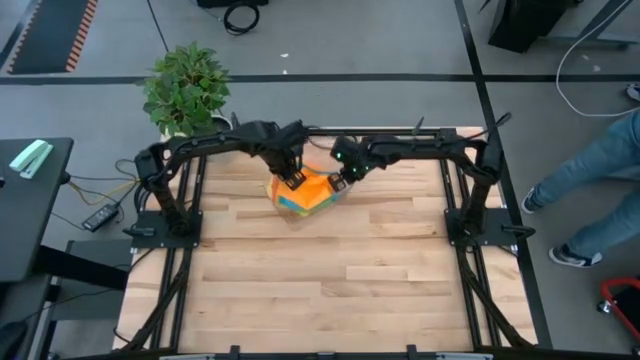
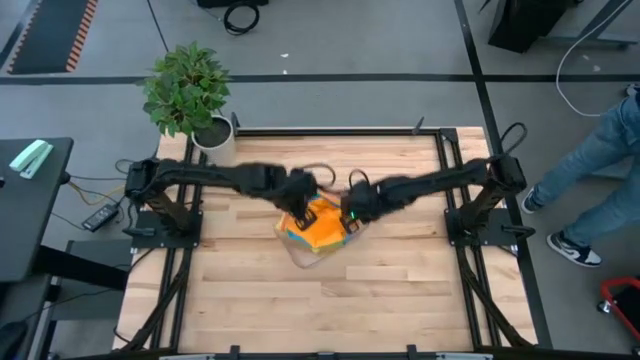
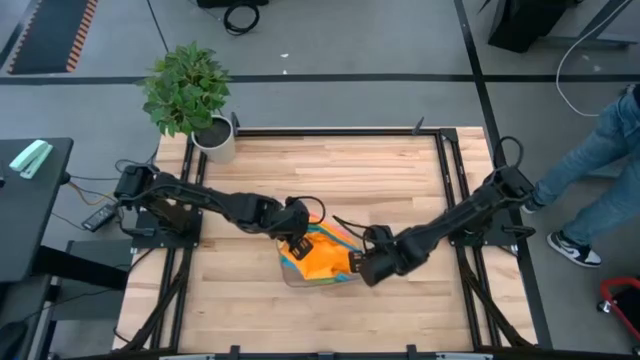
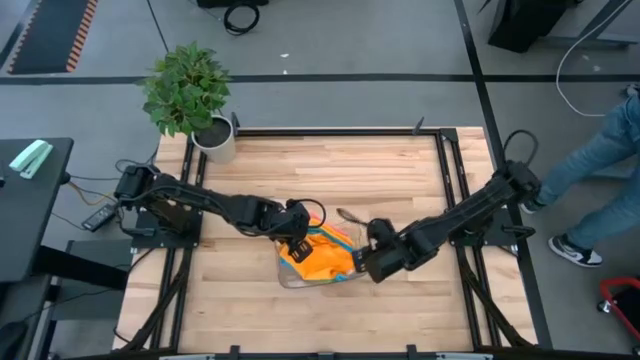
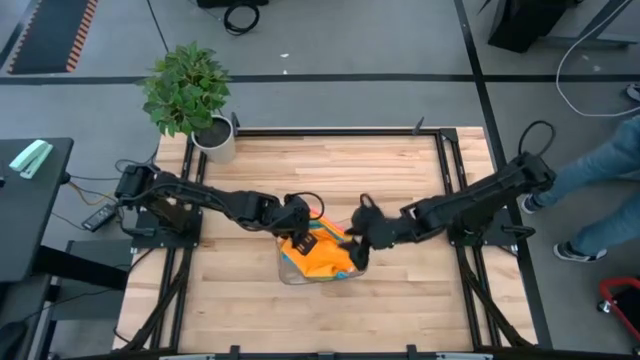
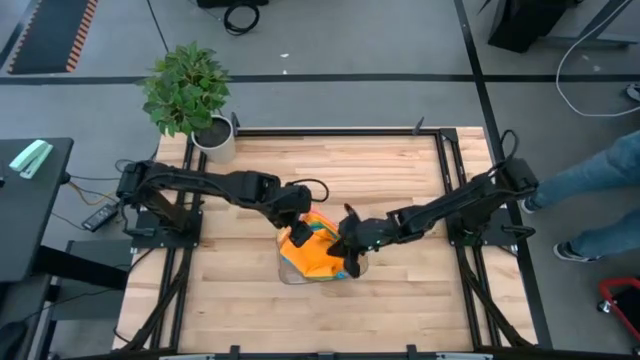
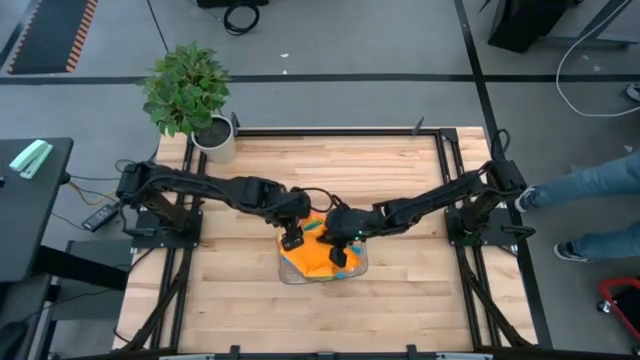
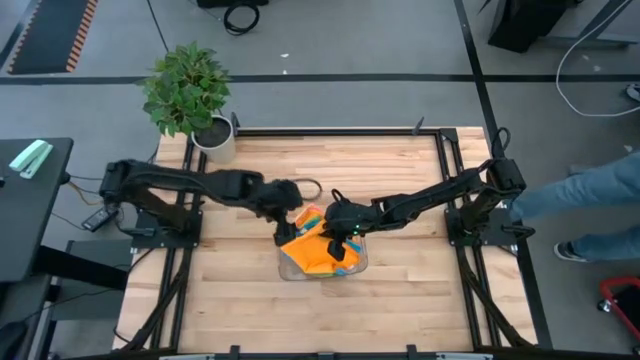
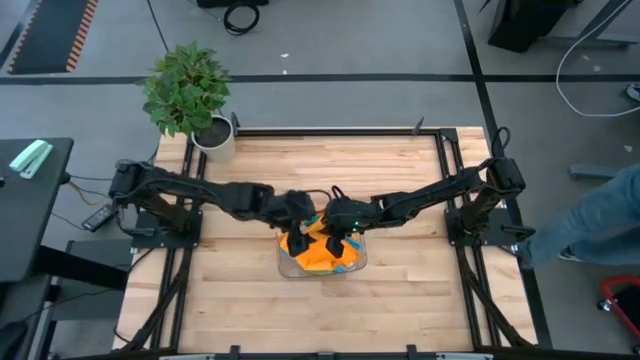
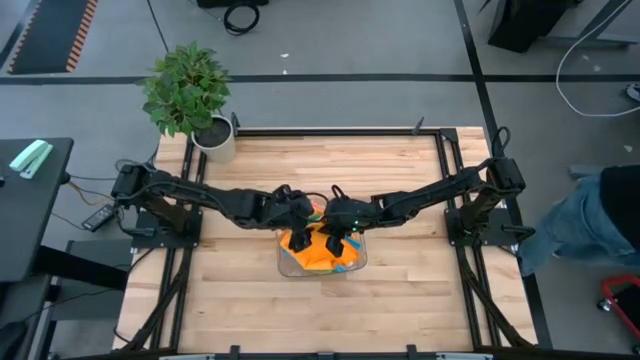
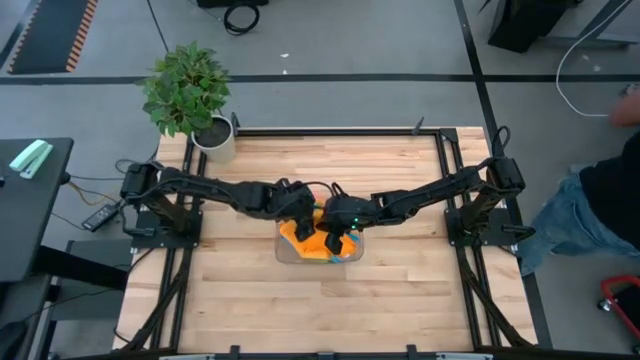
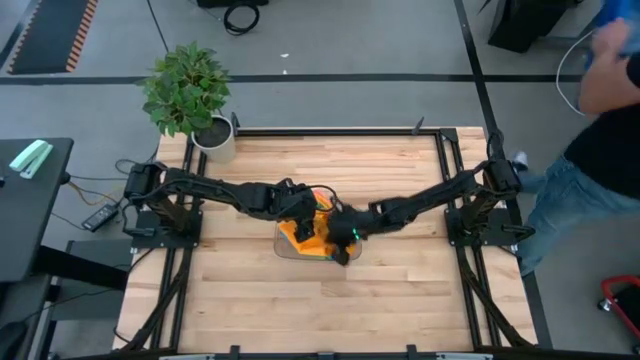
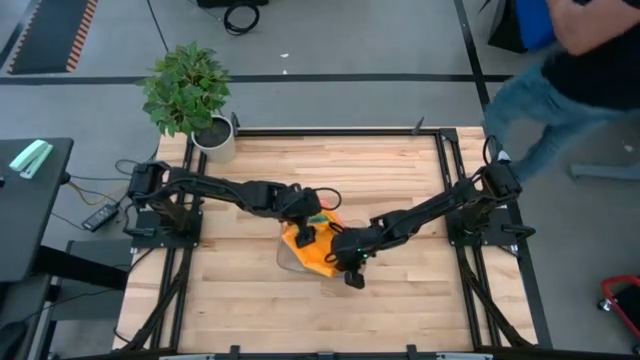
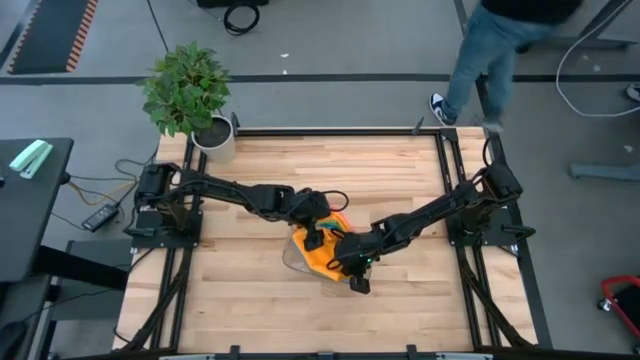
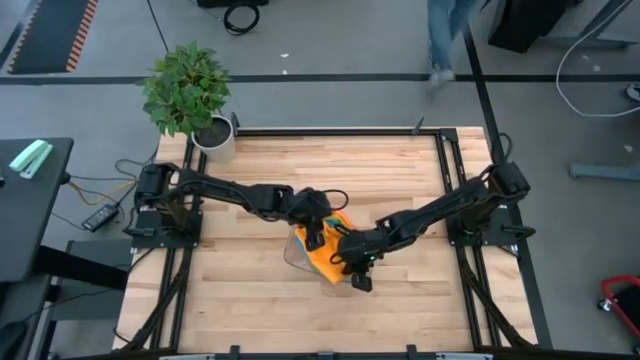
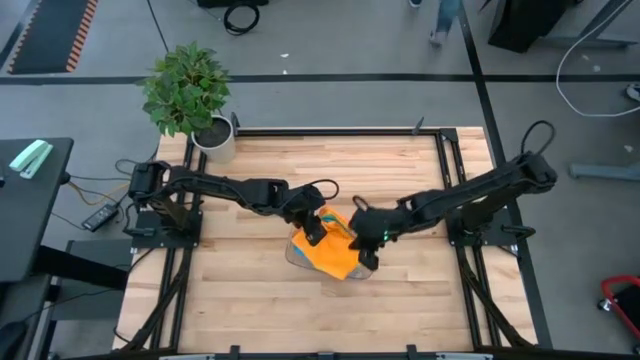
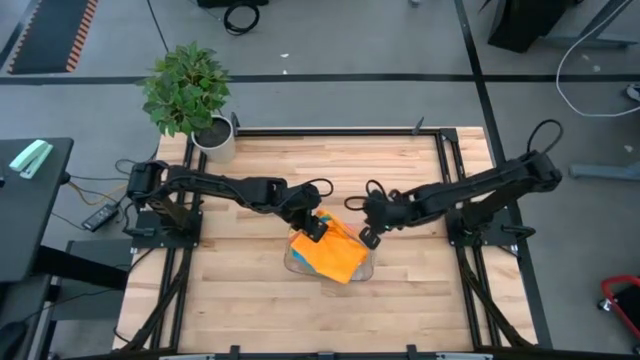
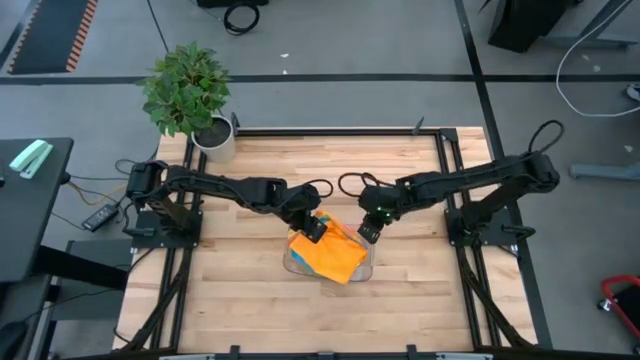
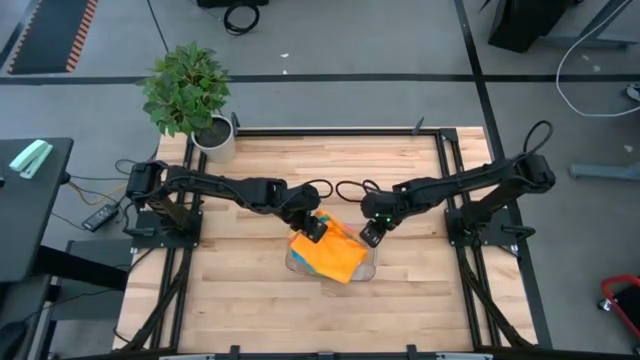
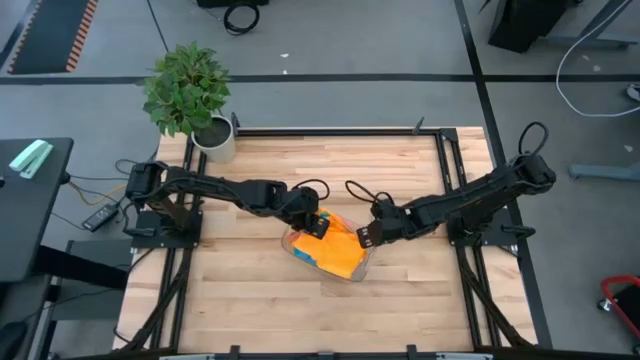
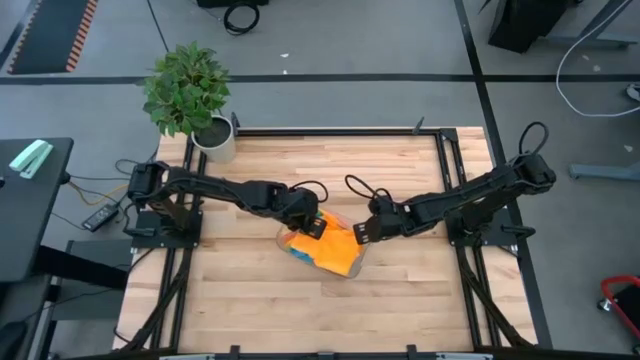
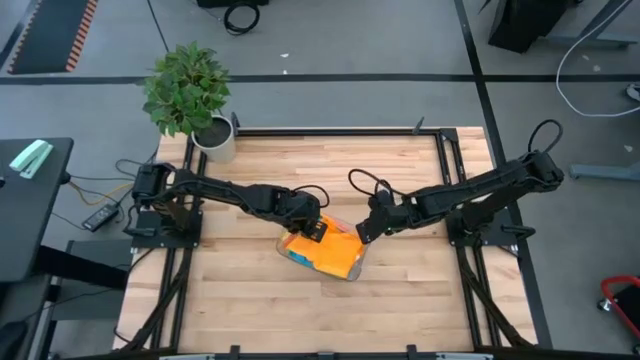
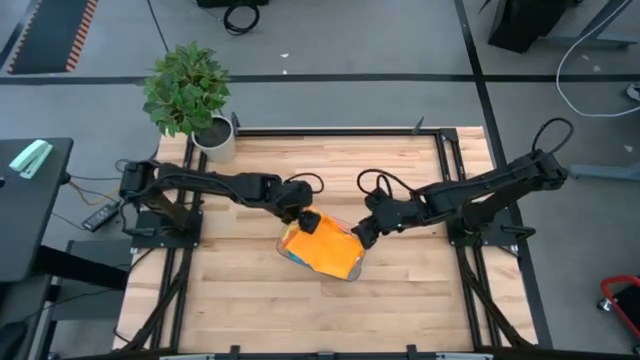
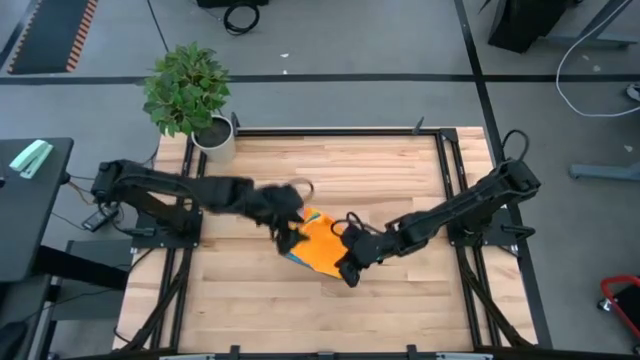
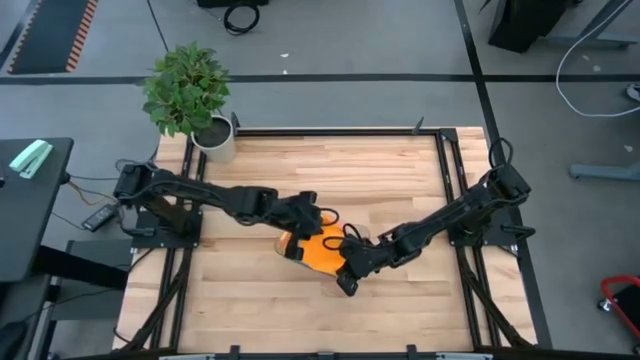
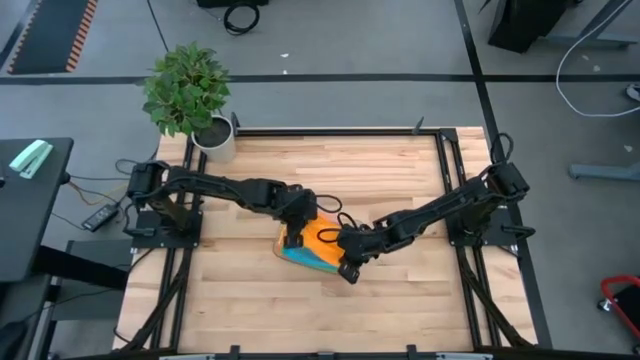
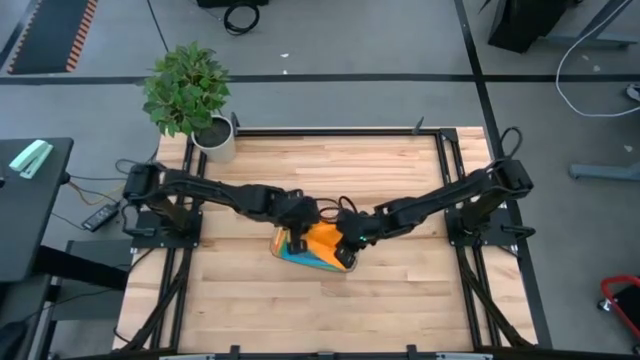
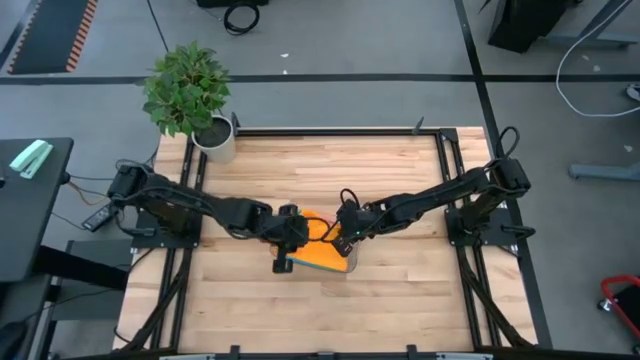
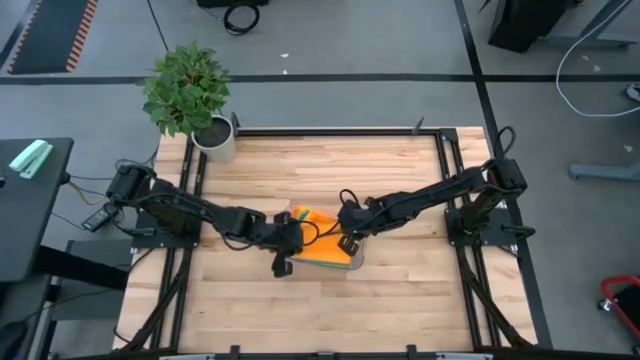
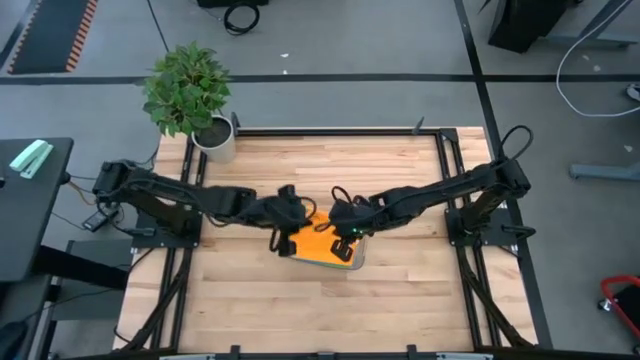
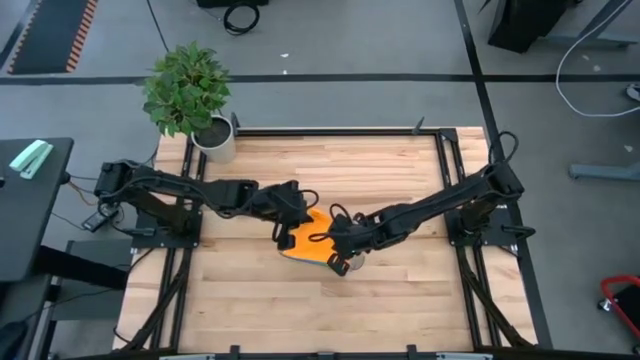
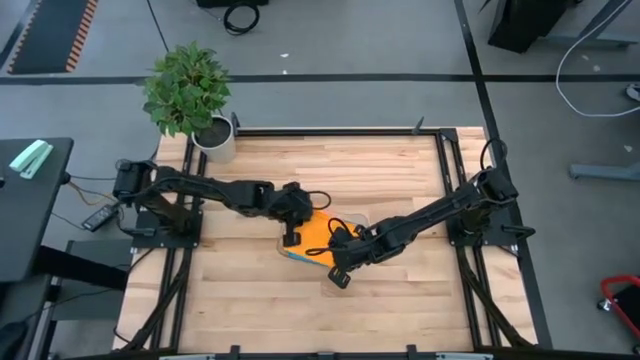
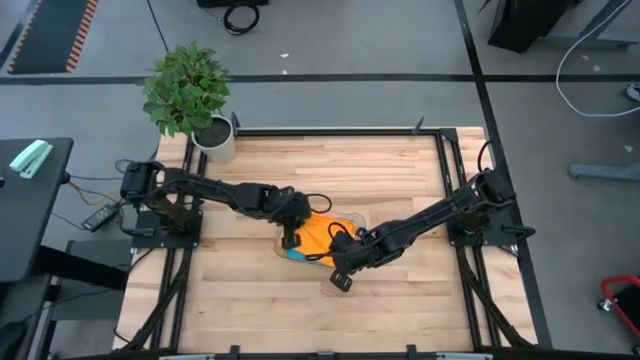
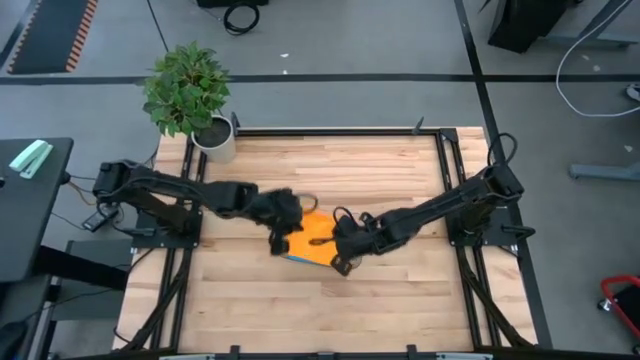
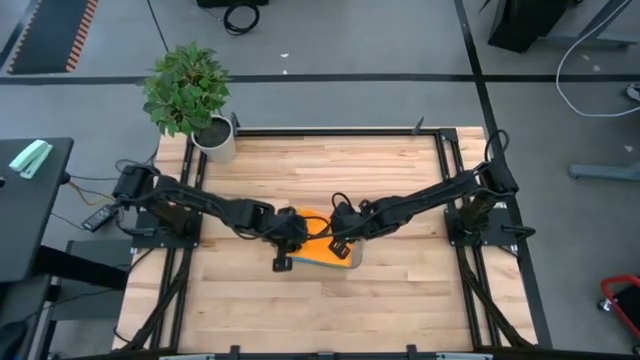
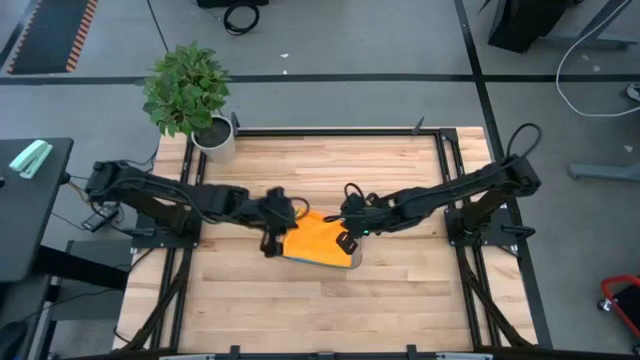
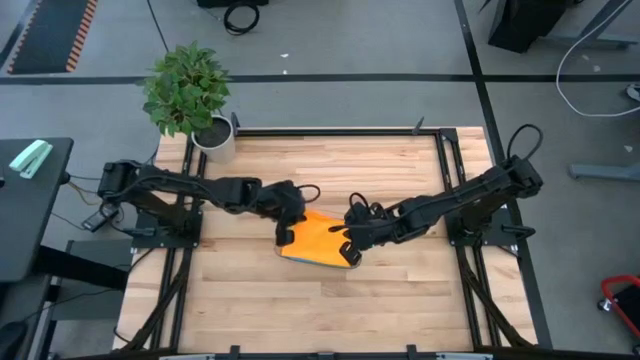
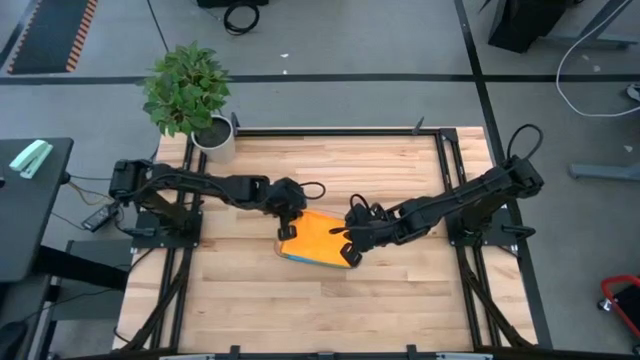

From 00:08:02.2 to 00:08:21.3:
Task: Fold microfiber towels
Put the stacked microfiber cloths into the transparent bin

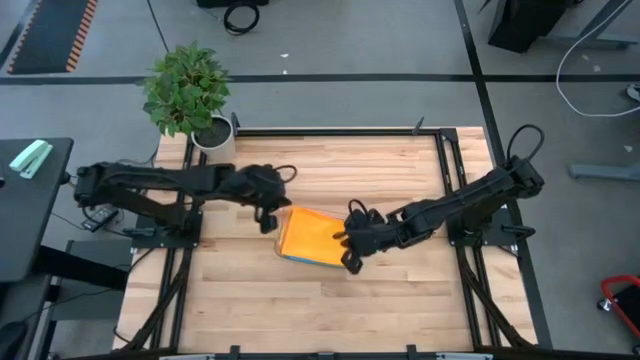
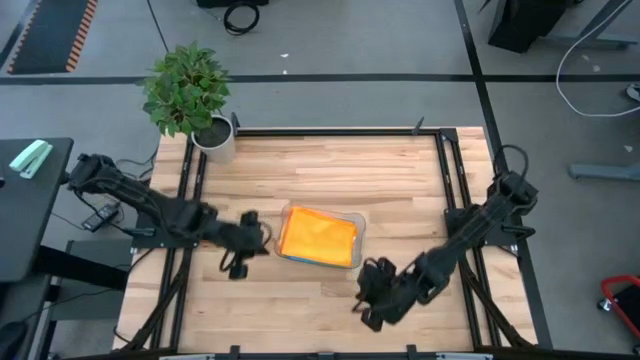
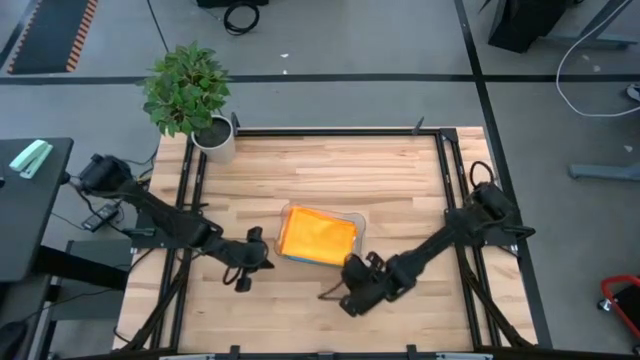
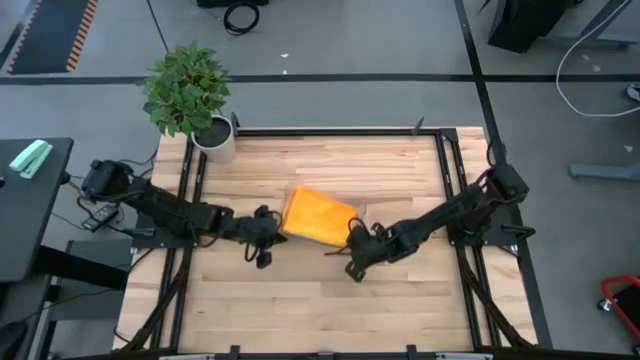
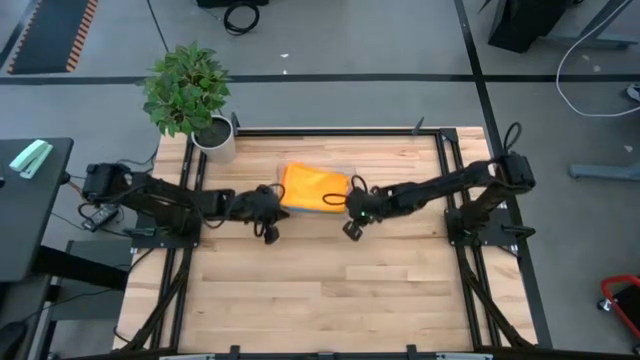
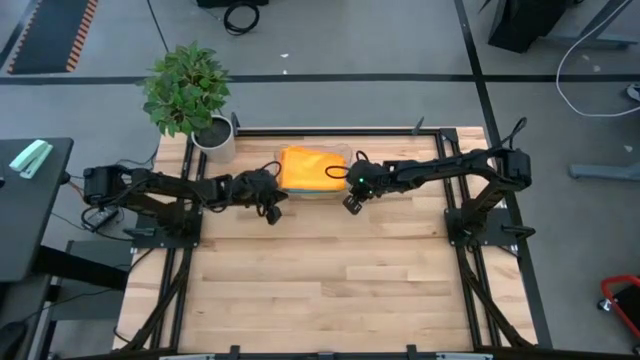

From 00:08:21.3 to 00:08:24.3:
Move the transparent bin to the top of the table
